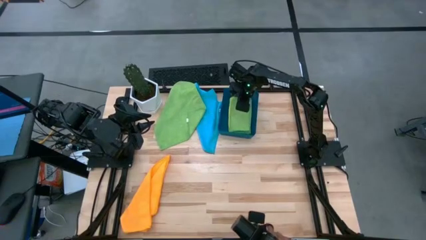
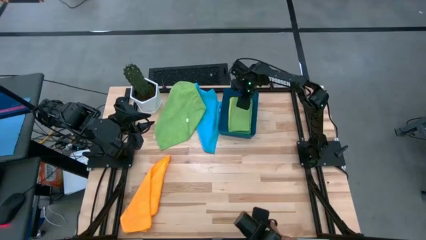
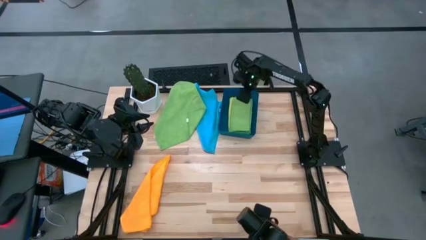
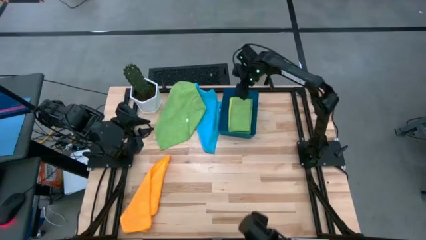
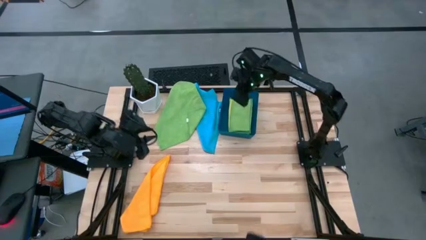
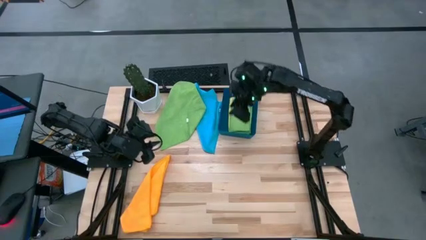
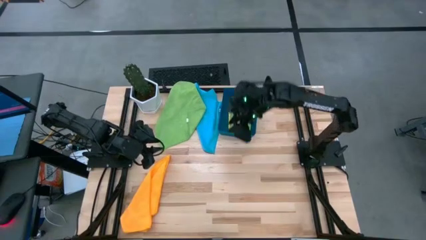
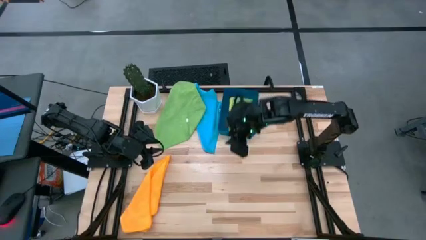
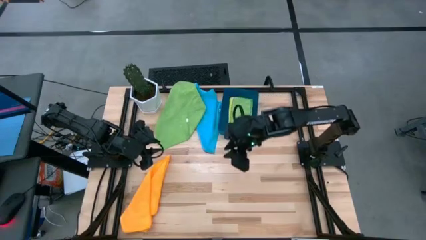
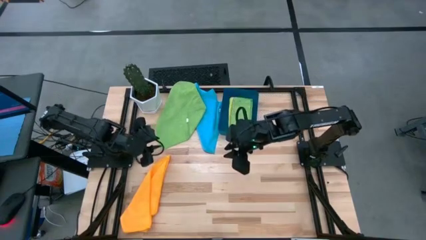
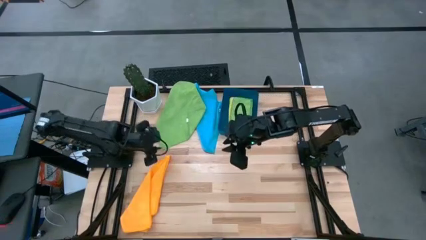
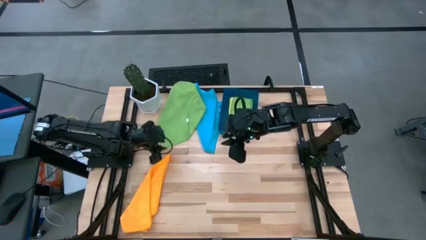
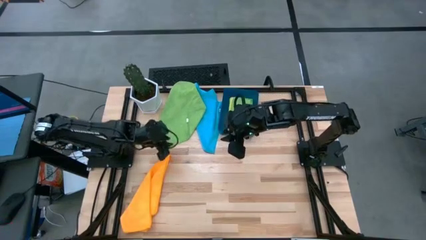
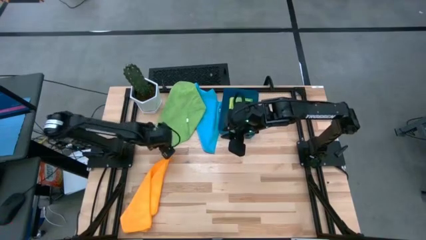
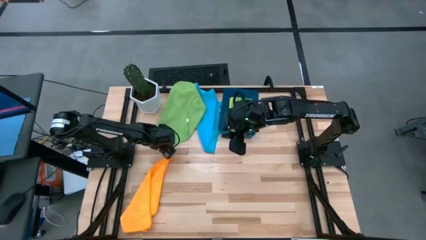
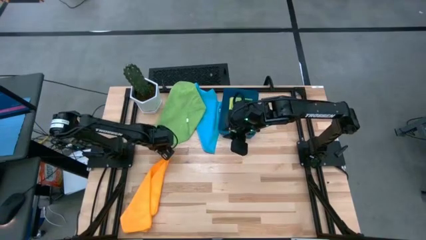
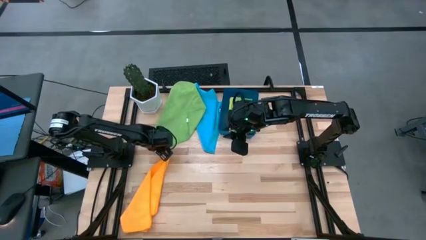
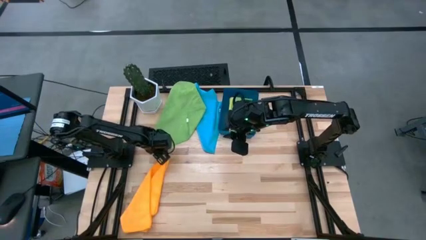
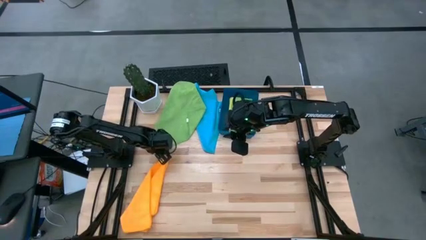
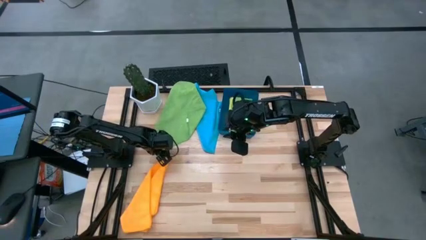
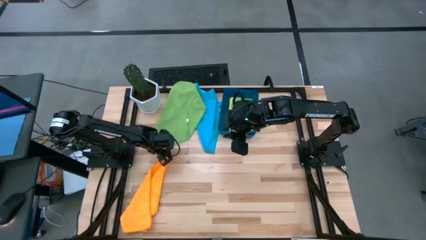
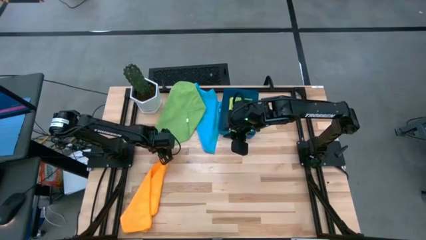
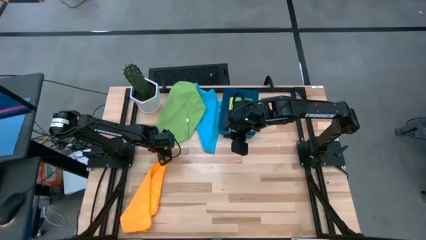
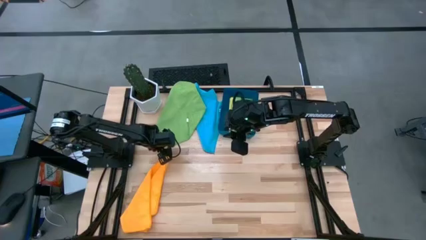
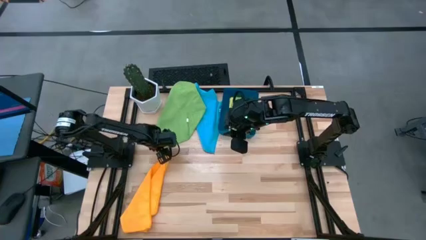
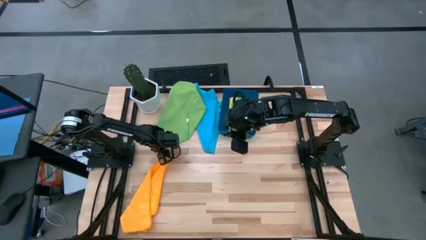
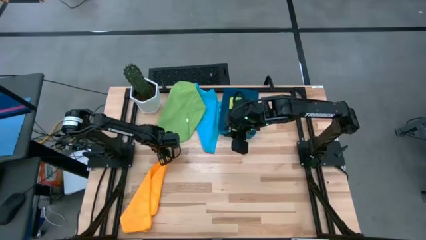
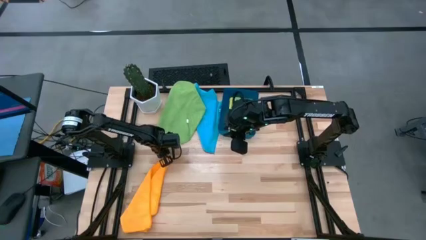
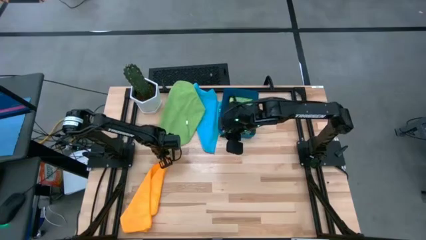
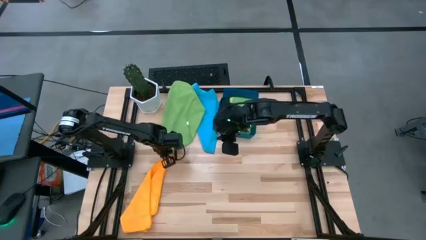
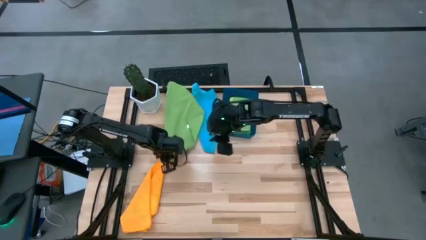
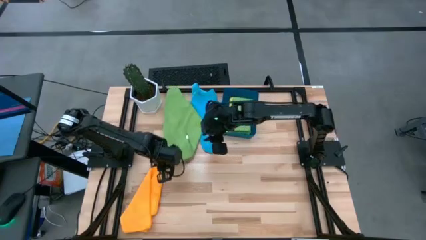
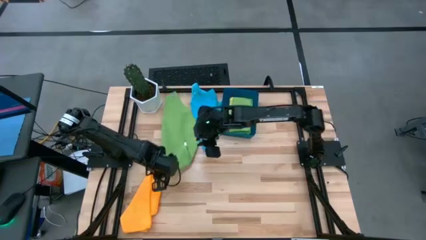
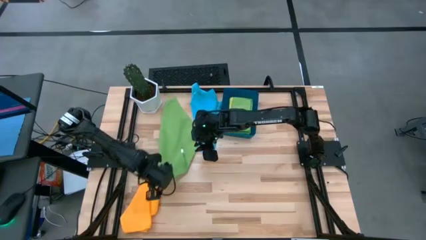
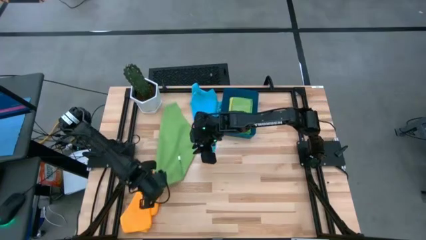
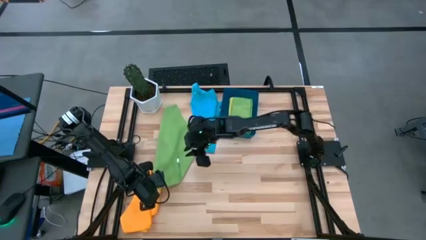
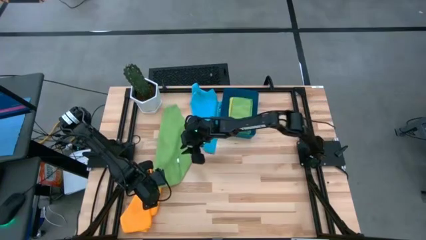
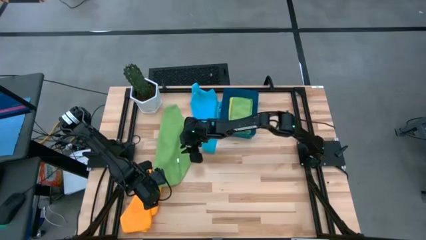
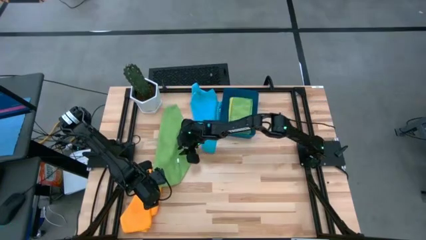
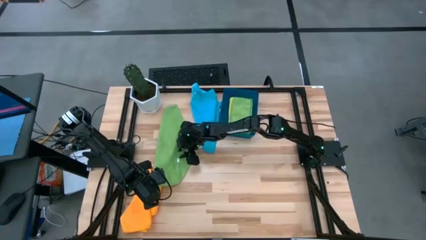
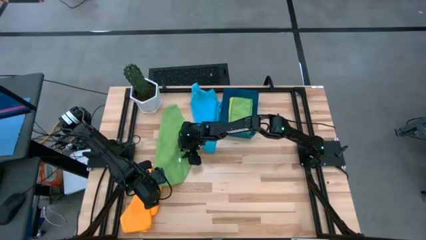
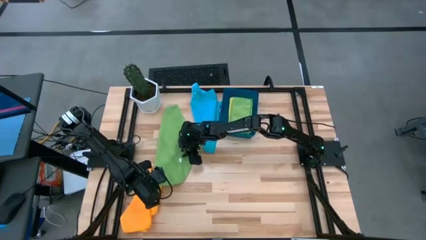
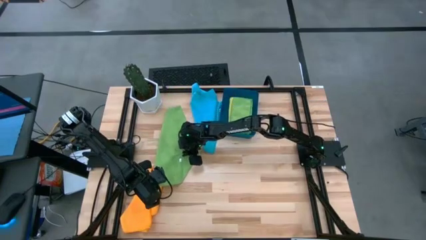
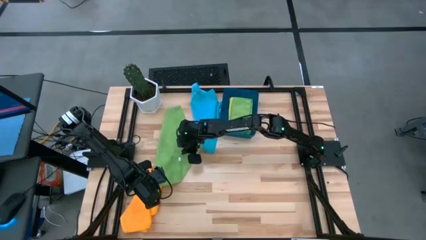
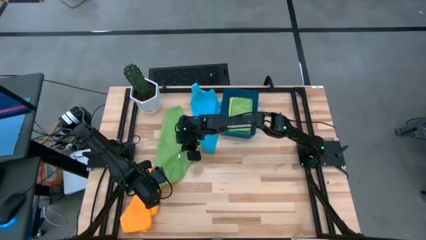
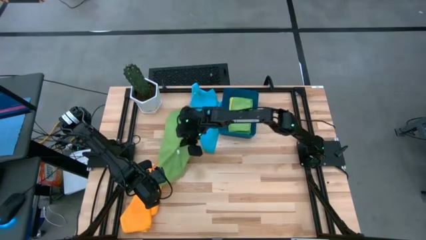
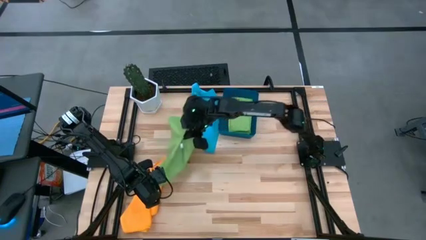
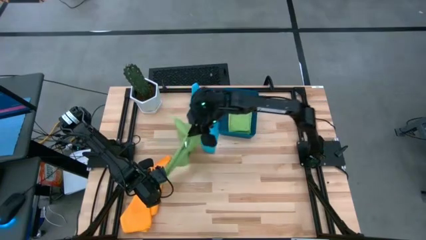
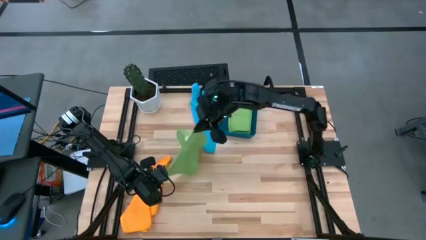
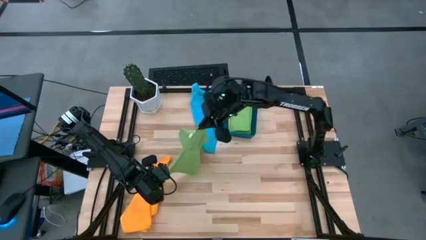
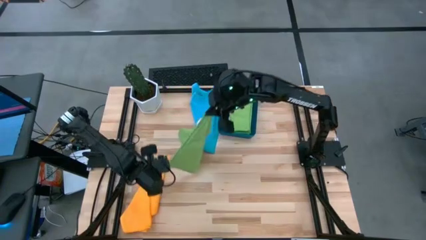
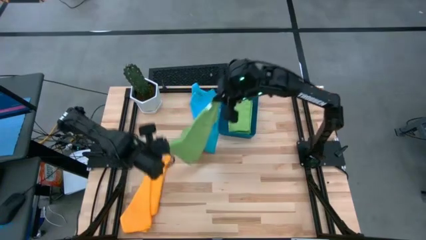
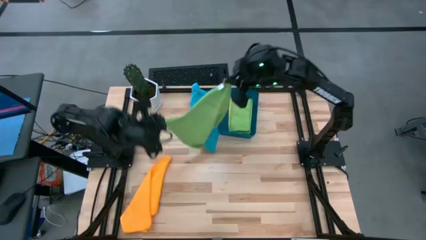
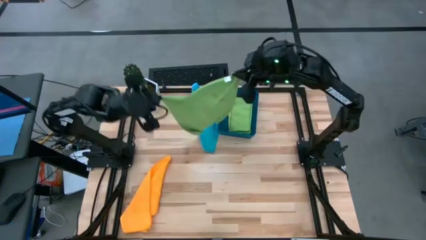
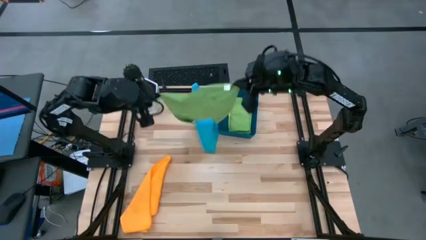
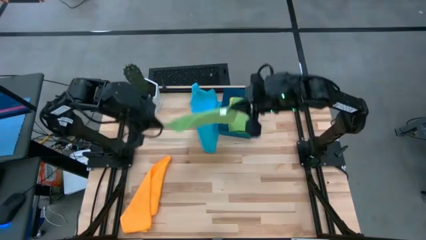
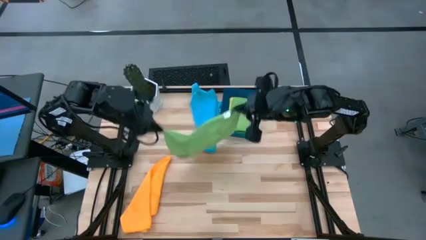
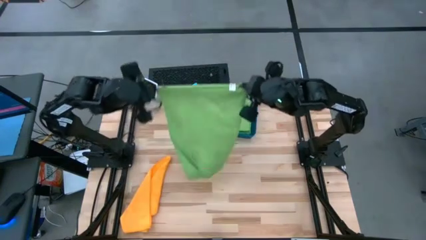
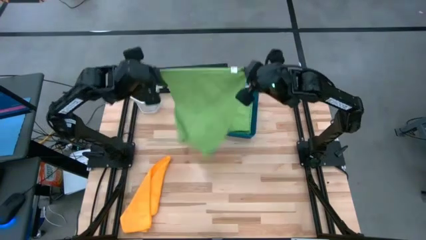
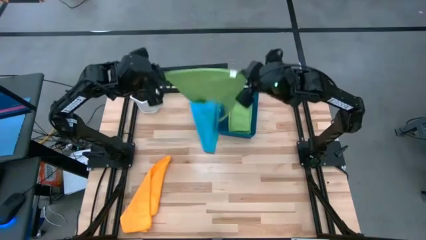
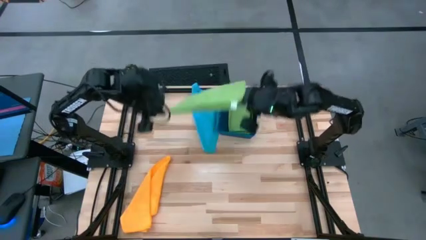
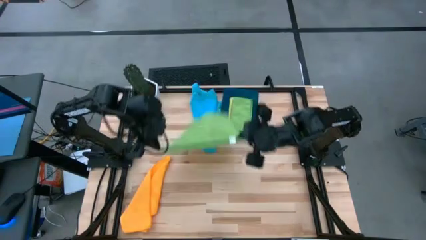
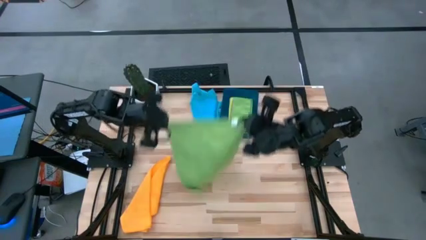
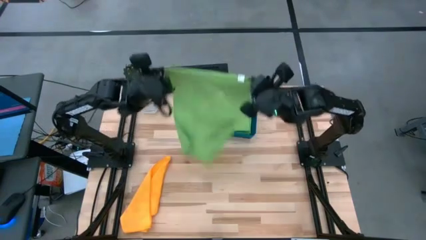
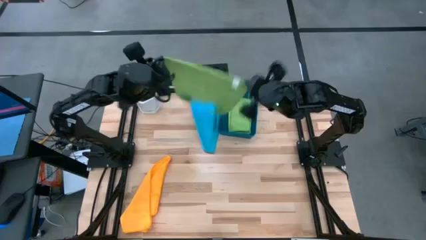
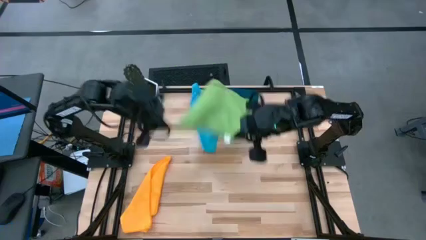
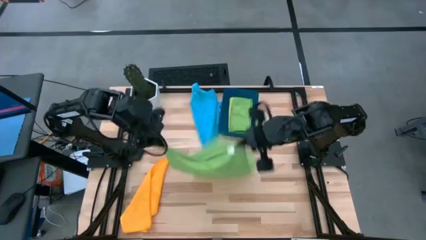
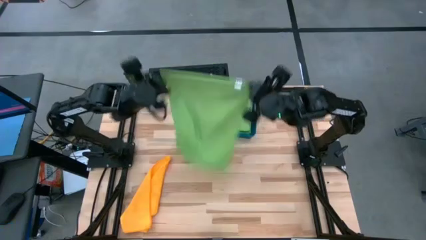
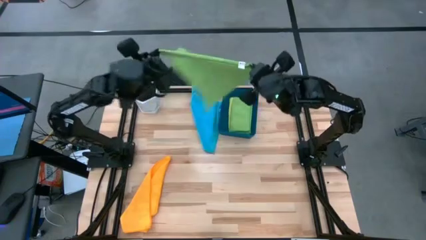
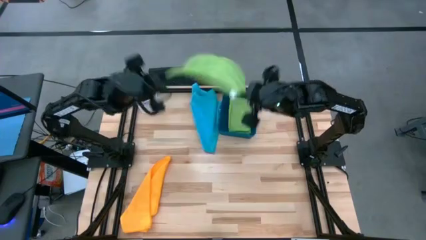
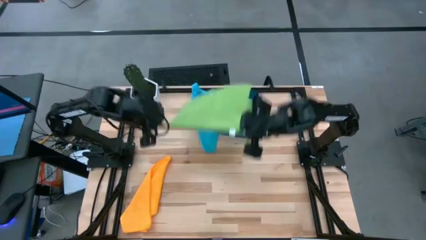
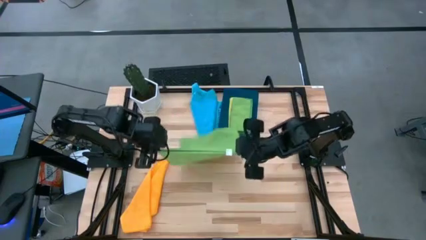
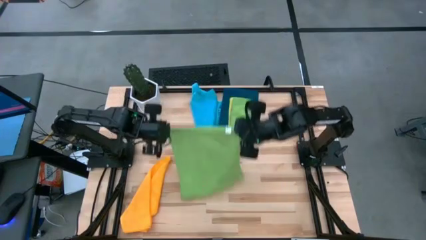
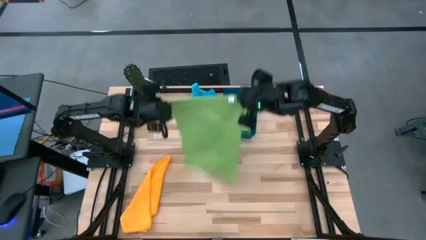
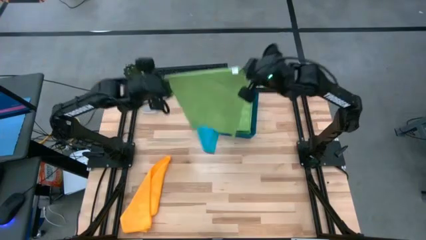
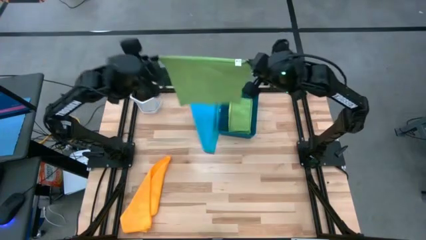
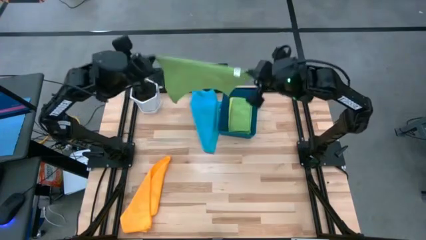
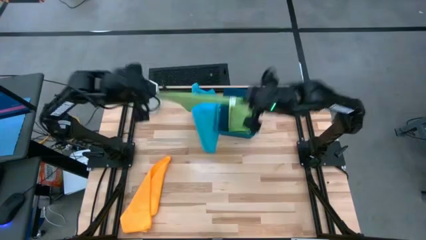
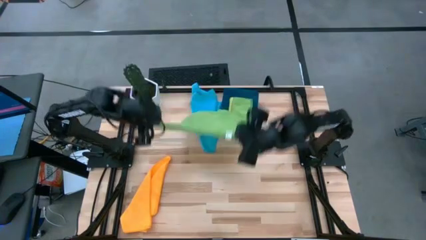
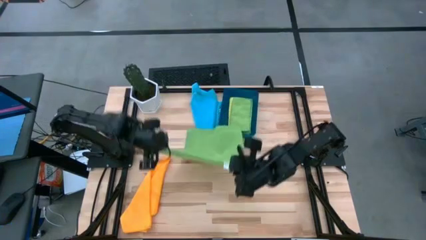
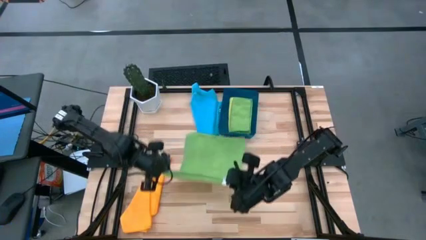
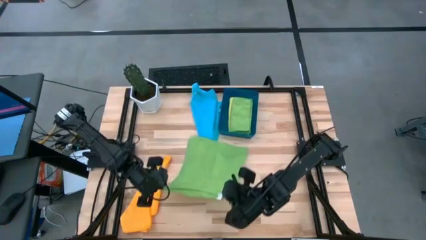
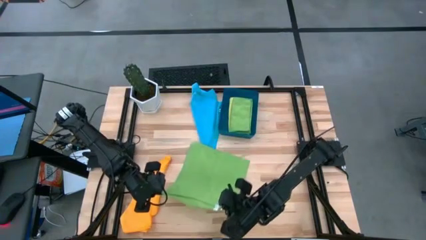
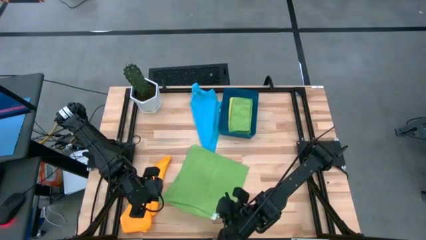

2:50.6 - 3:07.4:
Task: Fold microfiber towels
Fold the green towel
